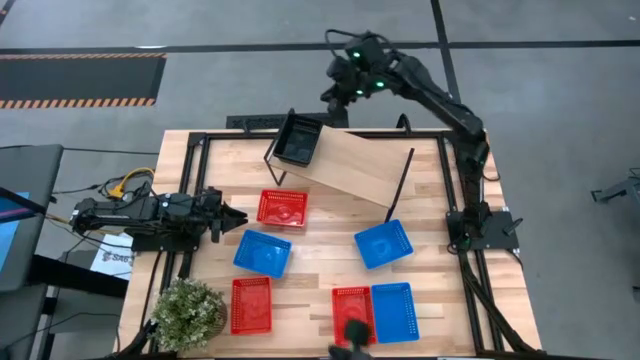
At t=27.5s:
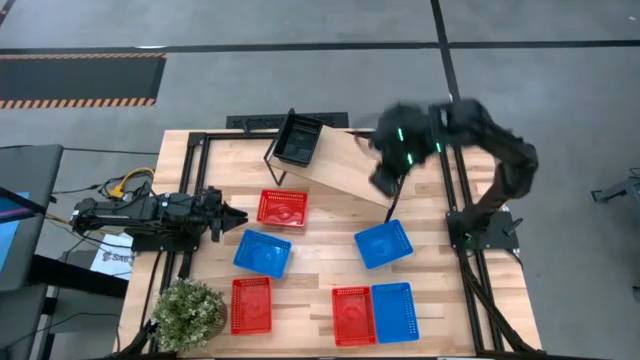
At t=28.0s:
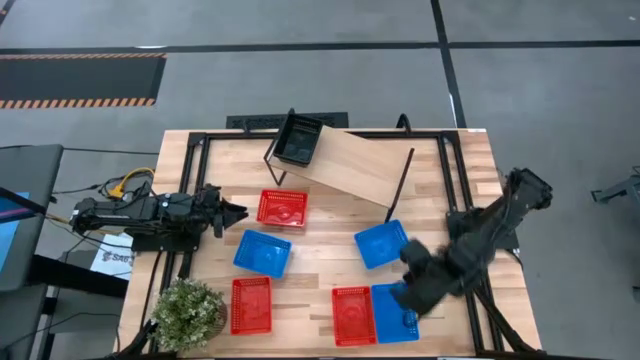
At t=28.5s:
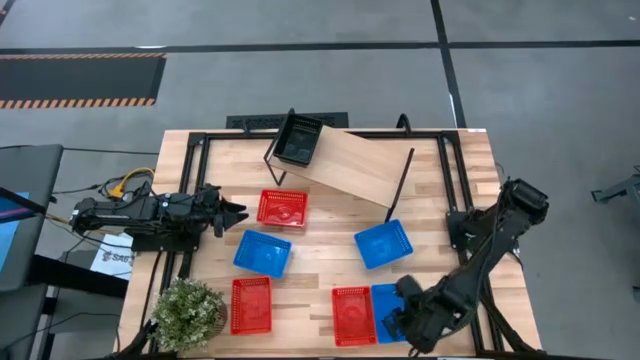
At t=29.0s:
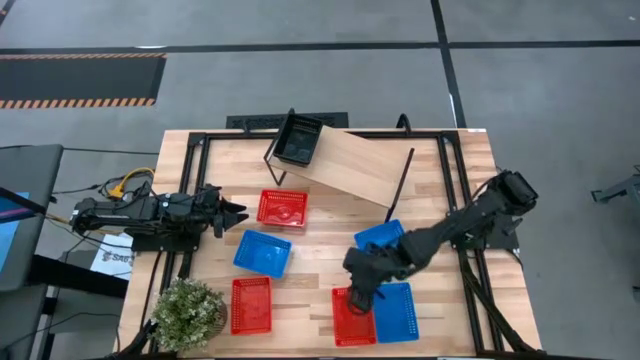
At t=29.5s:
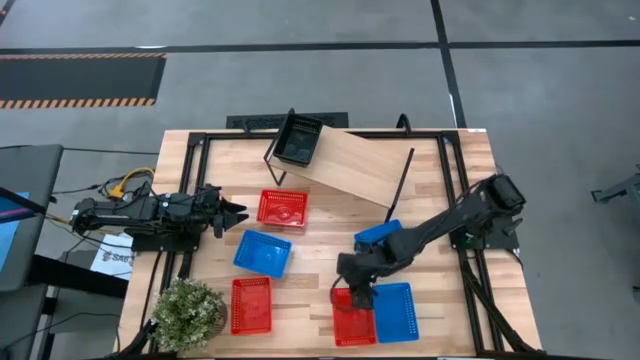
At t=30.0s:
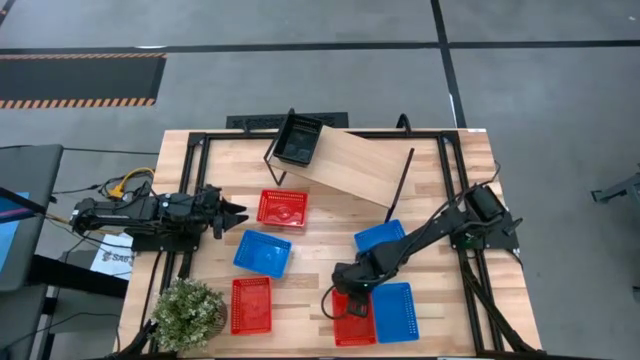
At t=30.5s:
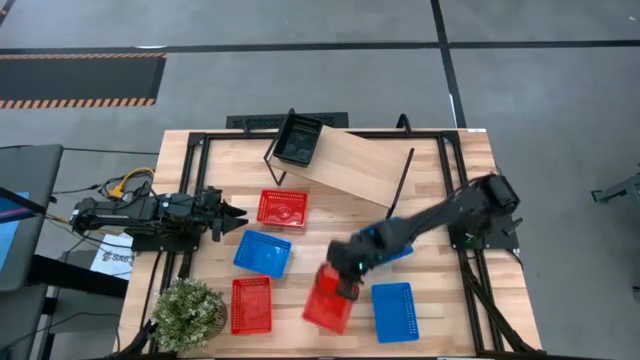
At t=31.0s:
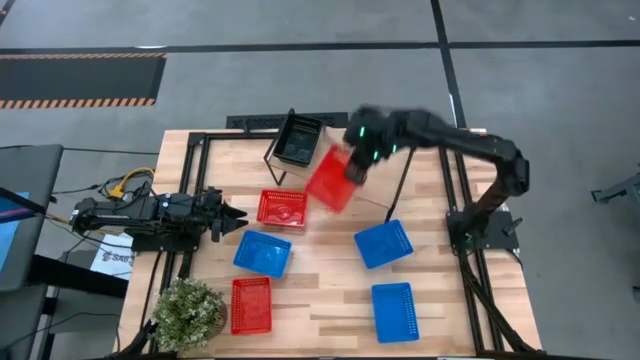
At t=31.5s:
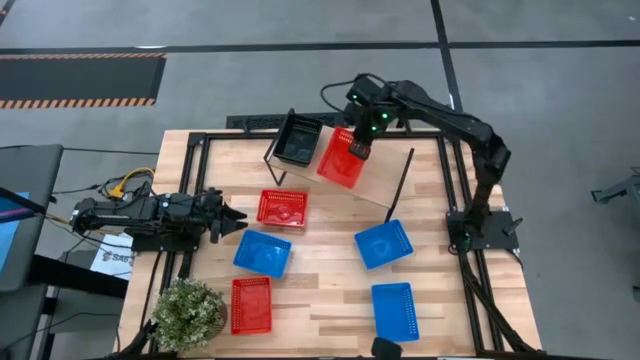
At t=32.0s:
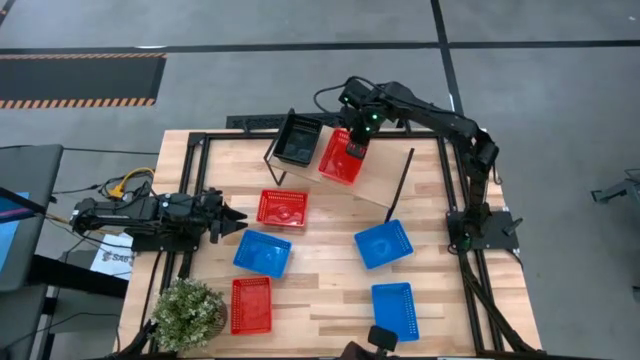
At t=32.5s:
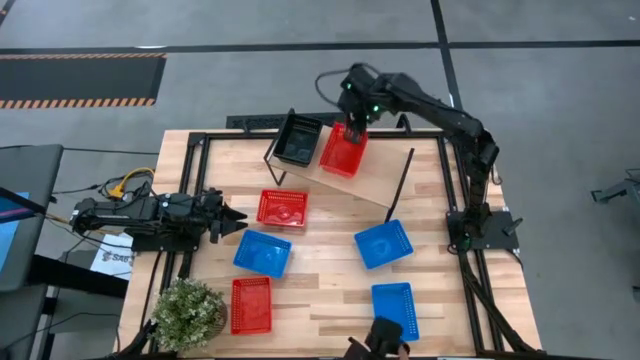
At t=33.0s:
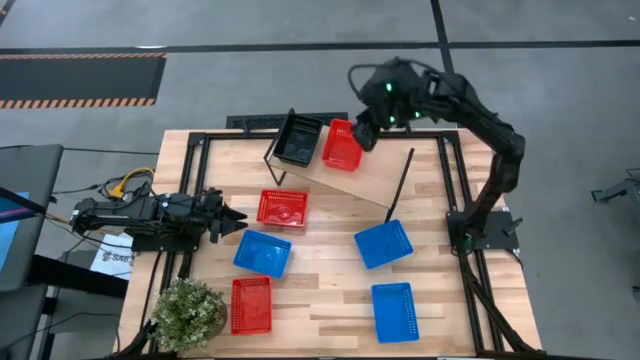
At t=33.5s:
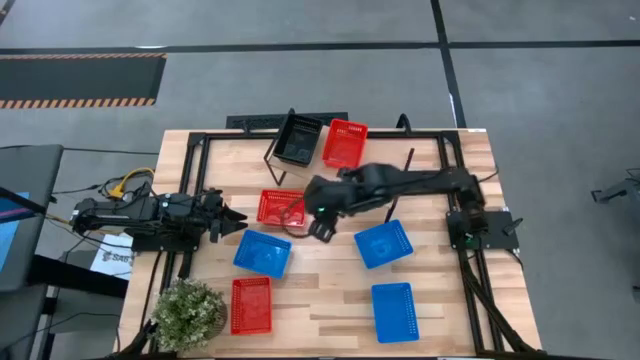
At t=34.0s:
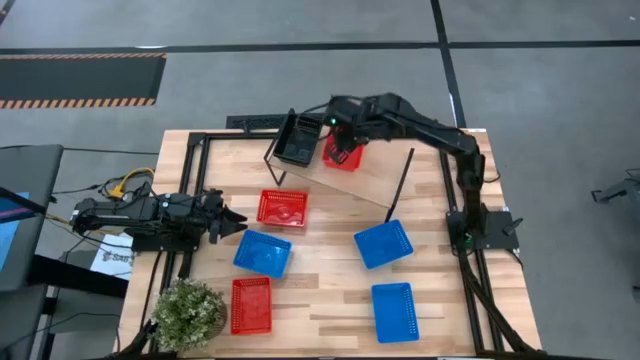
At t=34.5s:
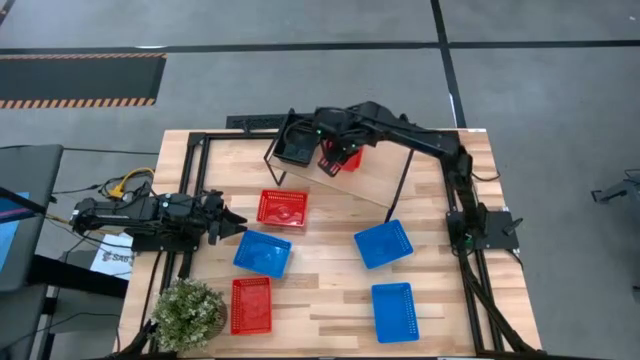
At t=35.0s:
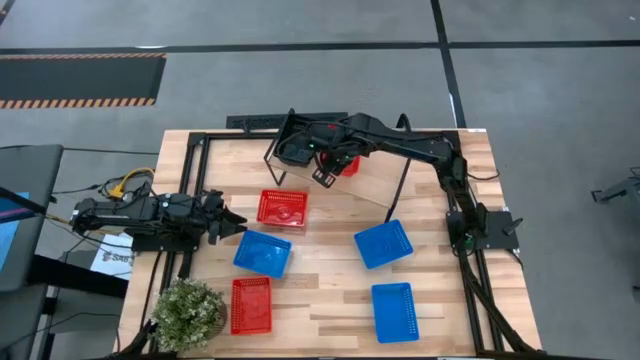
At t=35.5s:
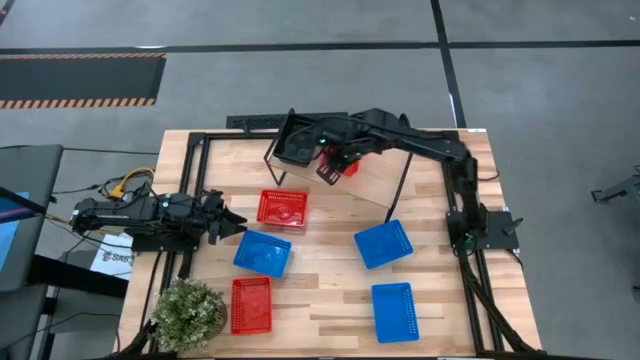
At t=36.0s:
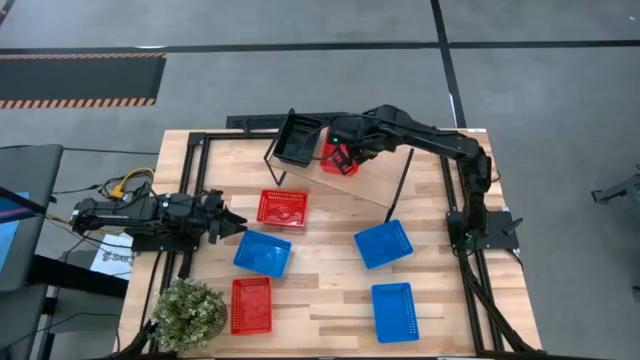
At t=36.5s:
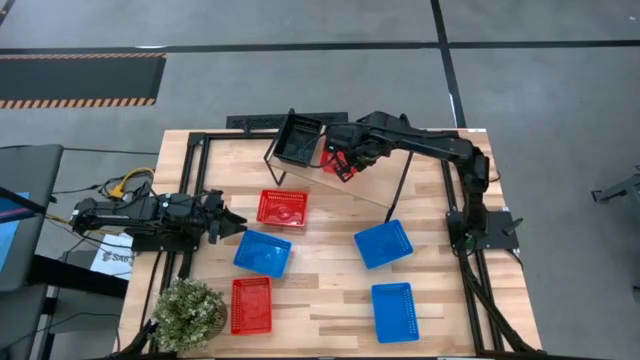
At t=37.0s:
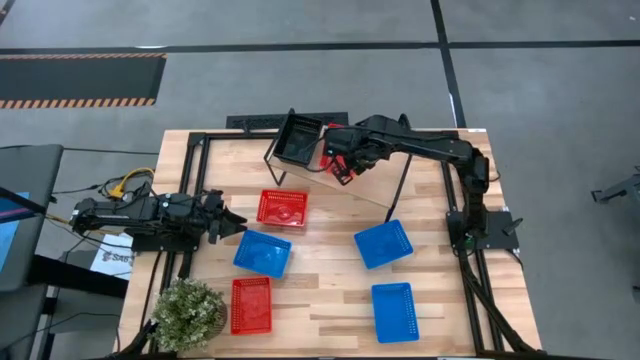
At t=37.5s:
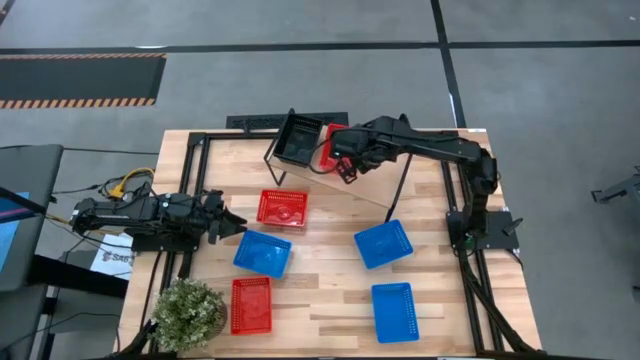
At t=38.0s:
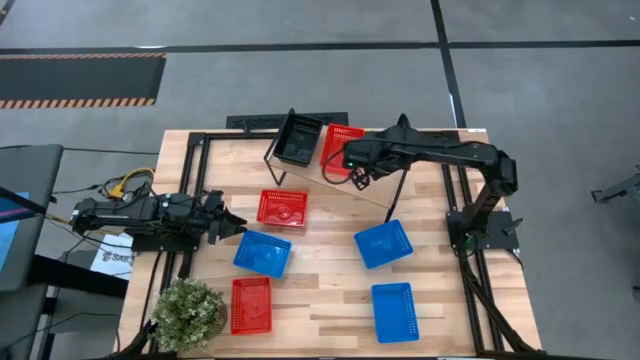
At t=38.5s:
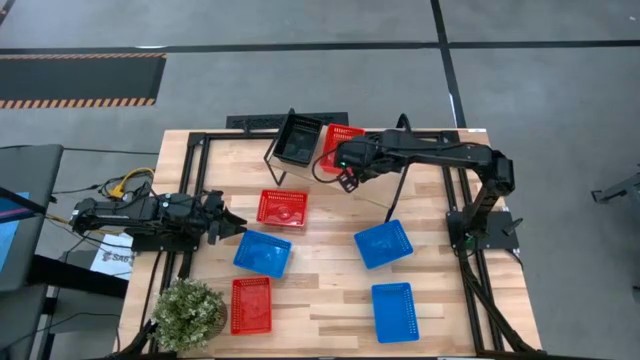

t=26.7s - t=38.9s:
Task: Stack baskets on shelf by color
Put the bottom right red bin on the shelf

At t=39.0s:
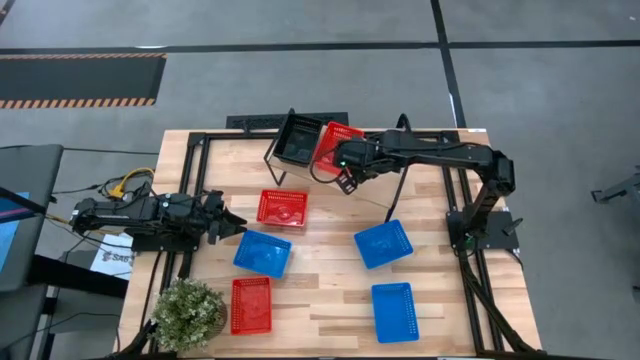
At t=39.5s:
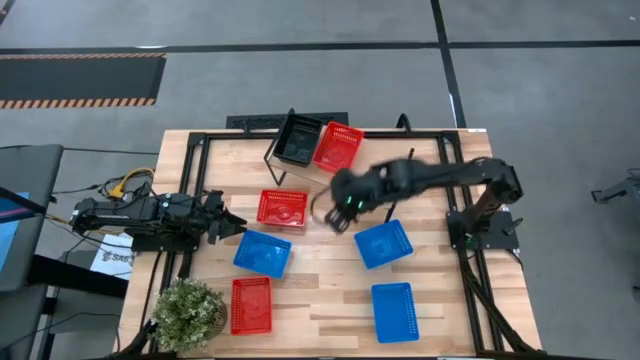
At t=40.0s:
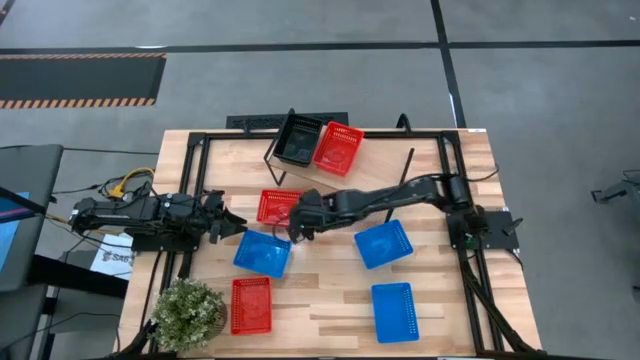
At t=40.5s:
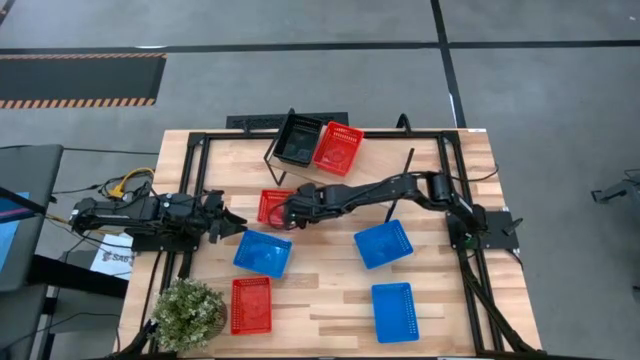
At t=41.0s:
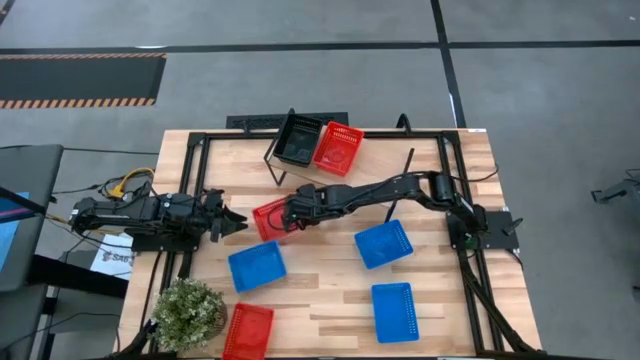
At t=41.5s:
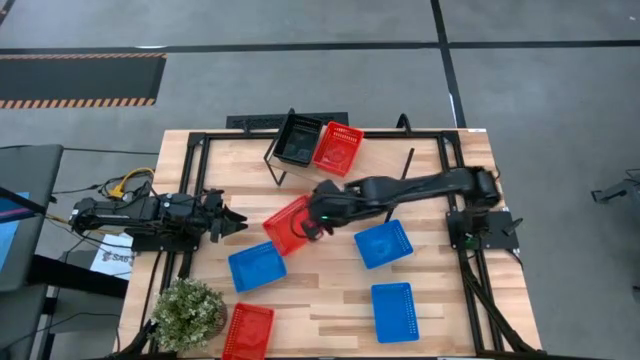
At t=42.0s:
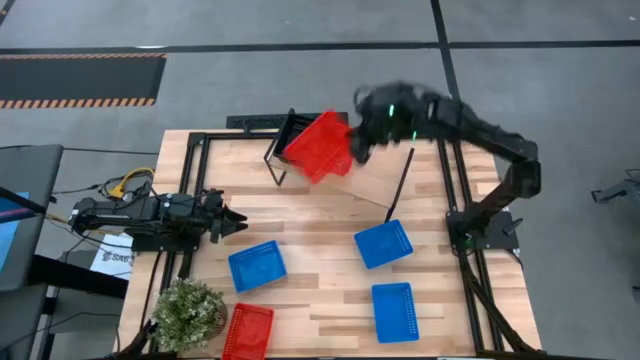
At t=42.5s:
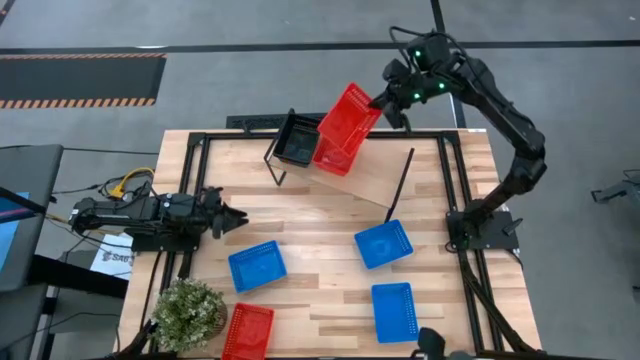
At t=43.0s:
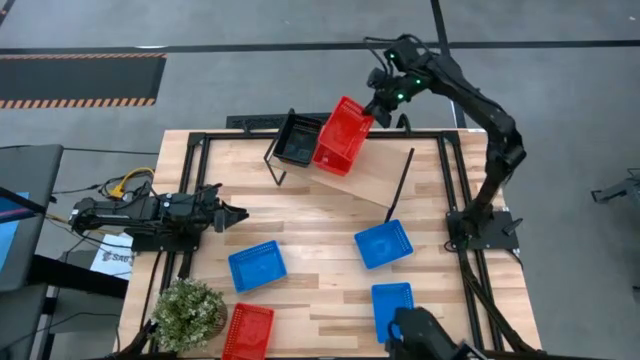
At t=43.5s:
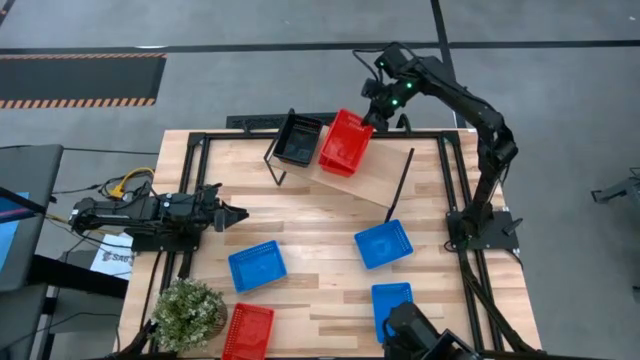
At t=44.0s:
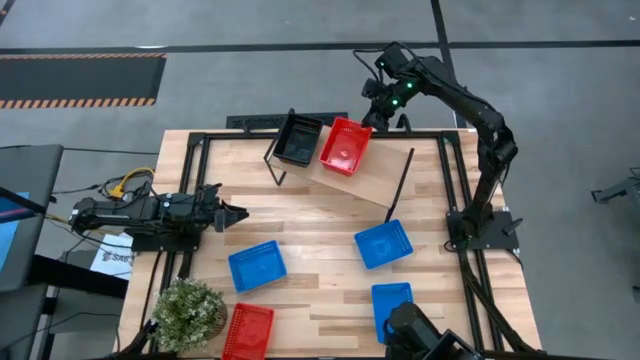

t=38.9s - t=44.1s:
Stack the top red bin on the red bin on the shelf

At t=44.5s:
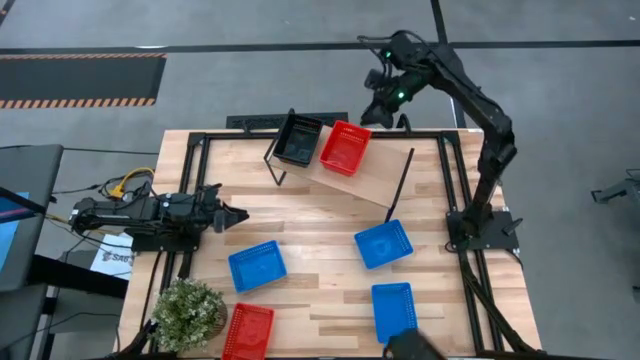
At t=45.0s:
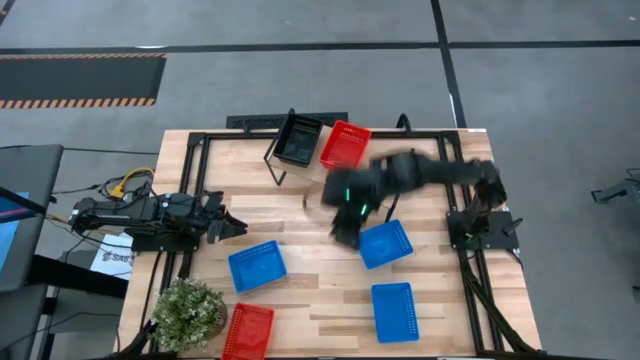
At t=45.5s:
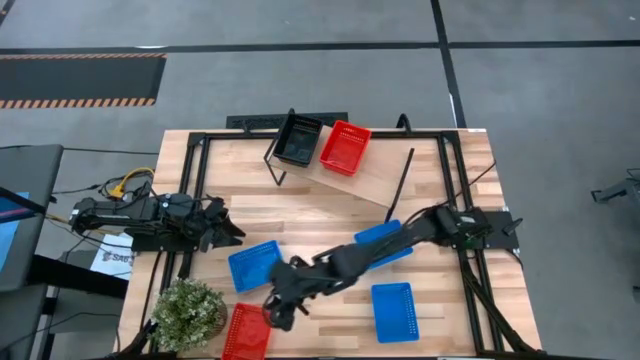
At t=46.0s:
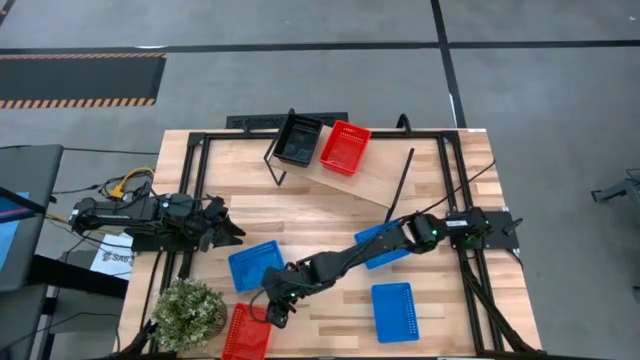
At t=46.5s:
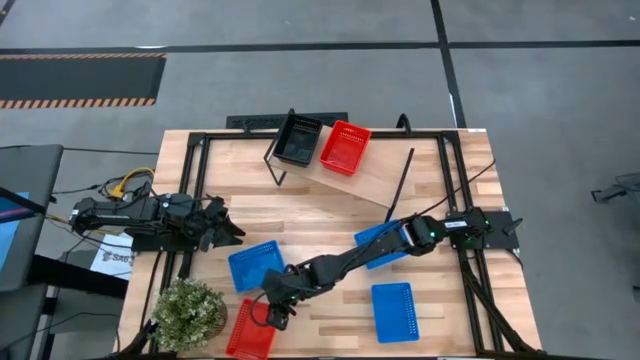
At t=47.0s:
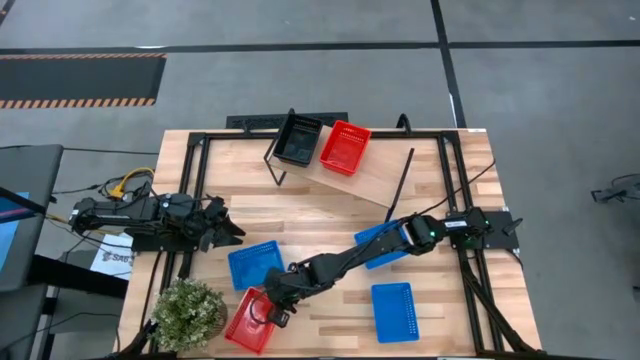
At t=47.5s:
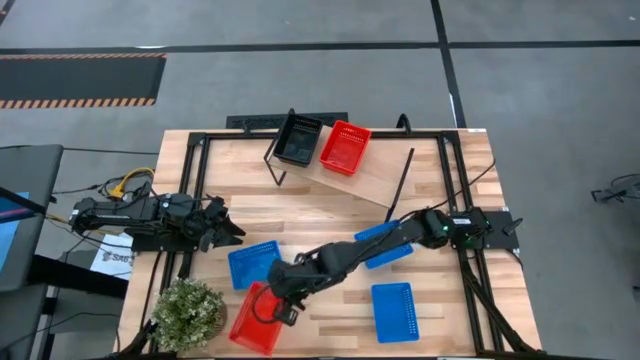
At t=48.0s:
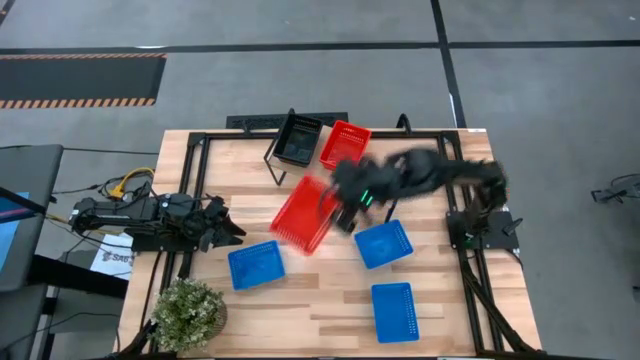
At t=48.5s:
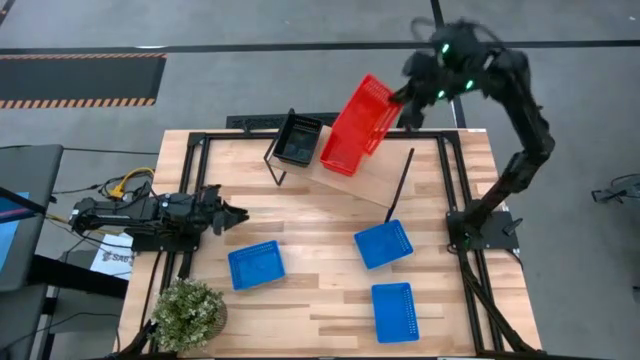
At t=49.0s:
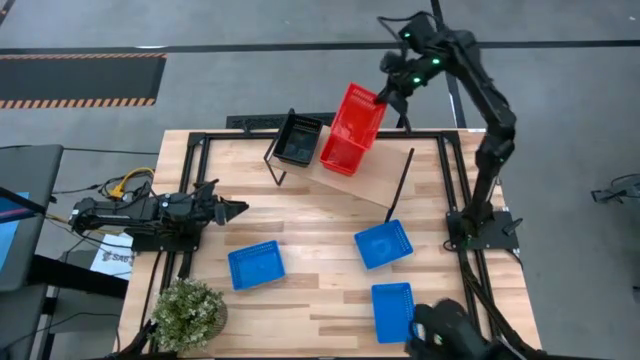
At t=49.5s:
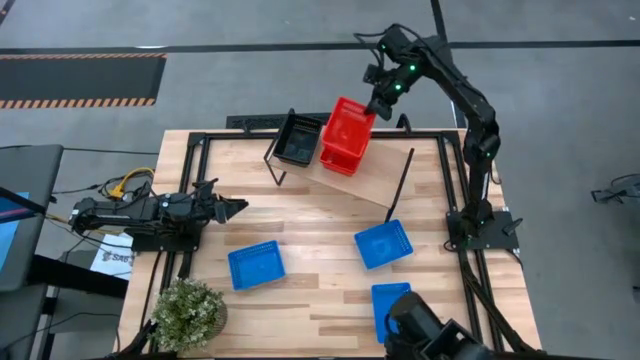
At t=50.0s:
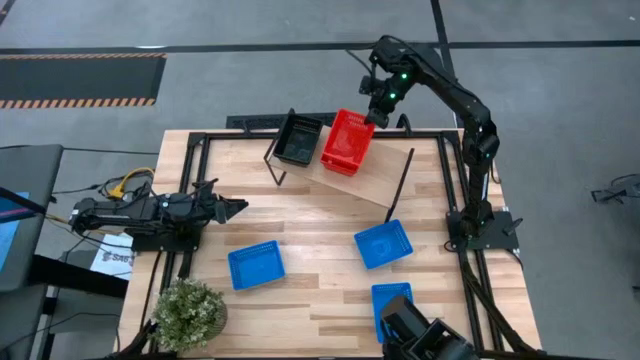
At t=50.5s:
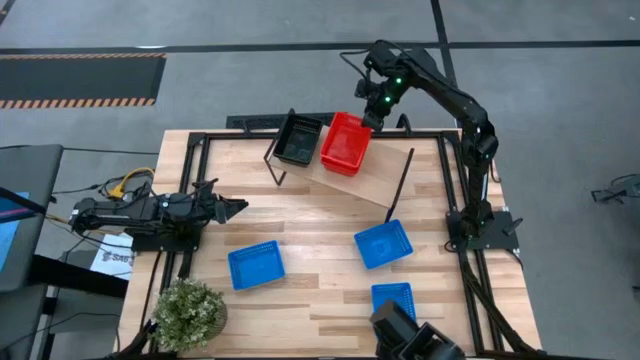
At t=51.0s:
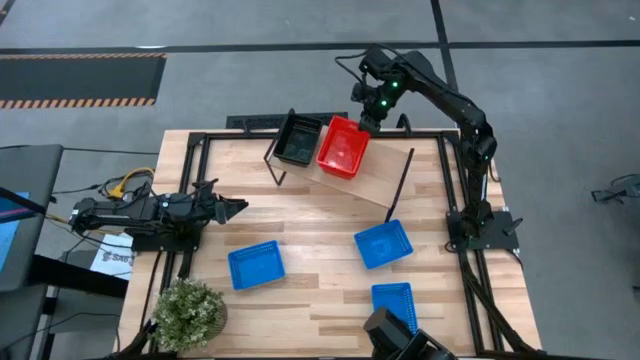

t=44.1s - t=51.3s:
Stack the red bin on the red bins on the shelf
